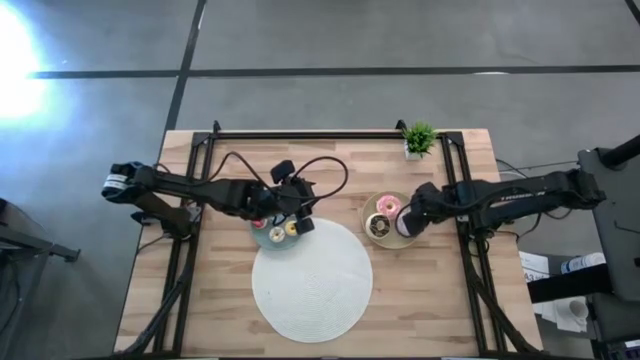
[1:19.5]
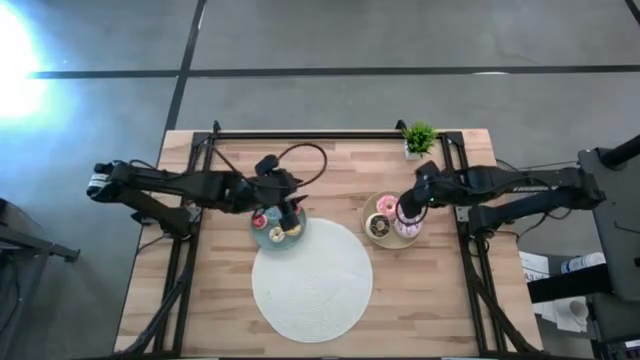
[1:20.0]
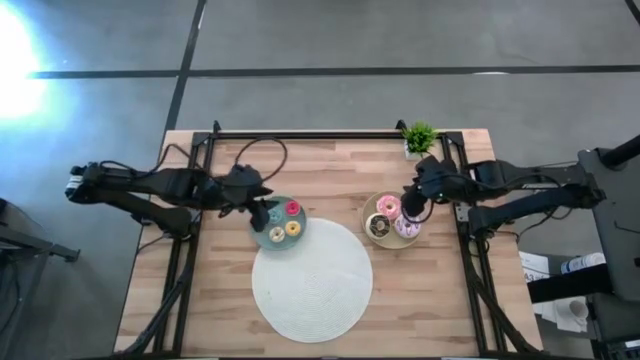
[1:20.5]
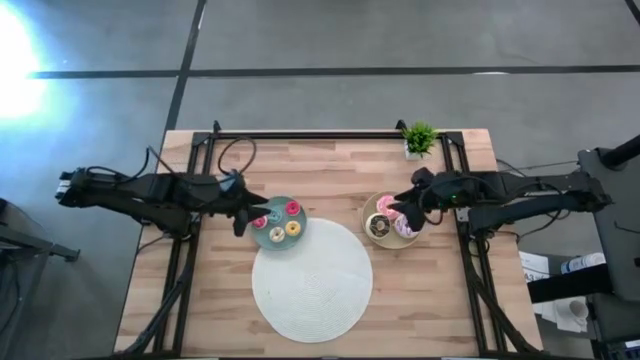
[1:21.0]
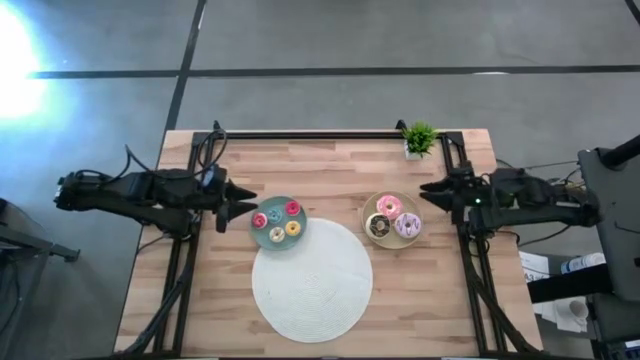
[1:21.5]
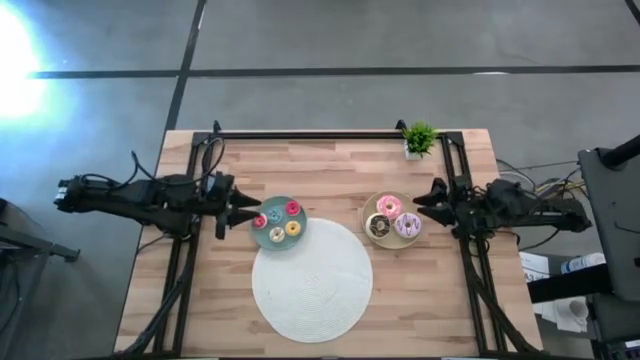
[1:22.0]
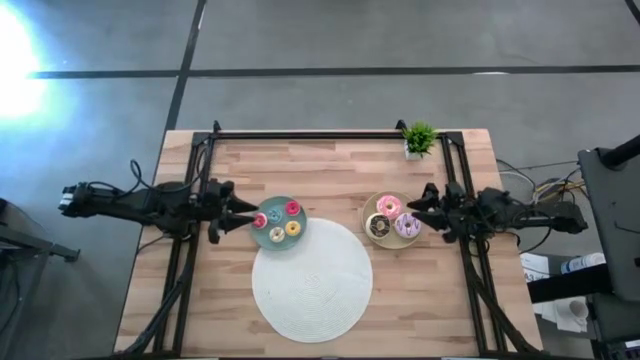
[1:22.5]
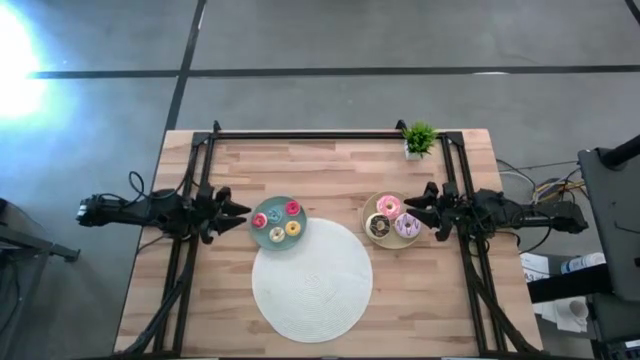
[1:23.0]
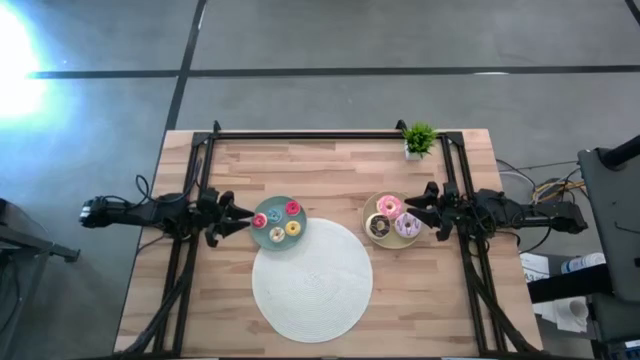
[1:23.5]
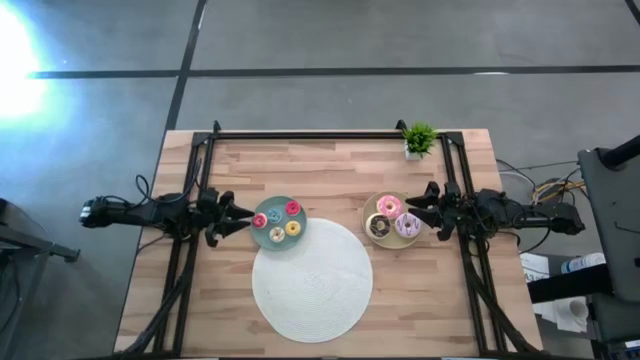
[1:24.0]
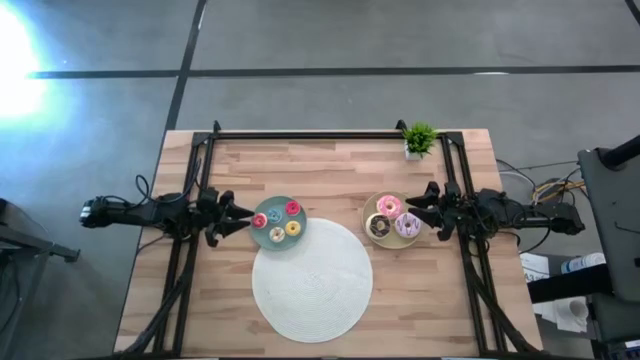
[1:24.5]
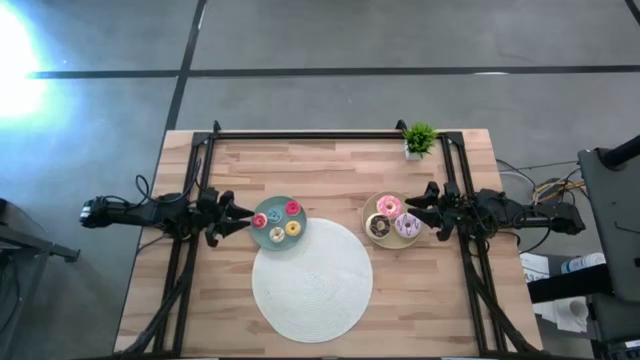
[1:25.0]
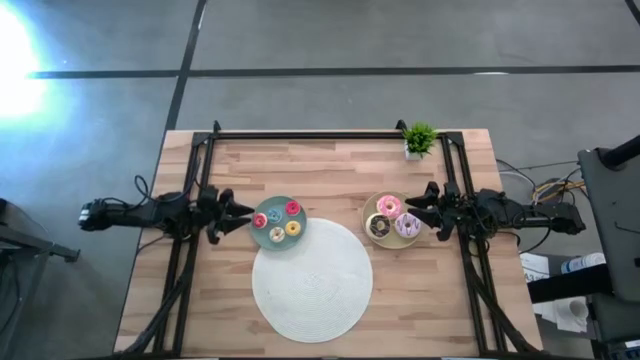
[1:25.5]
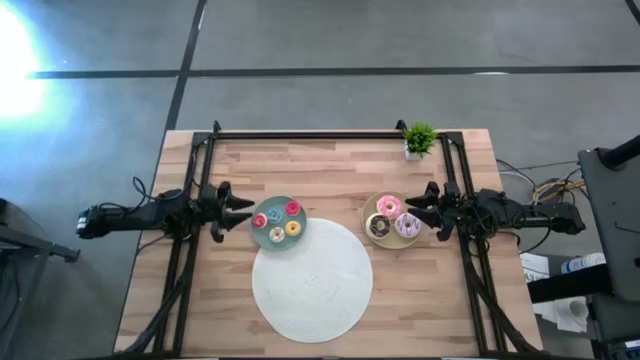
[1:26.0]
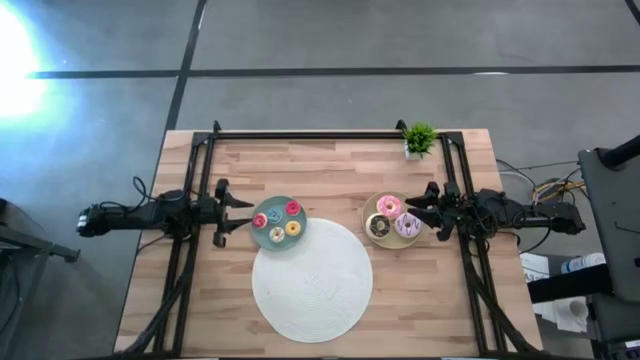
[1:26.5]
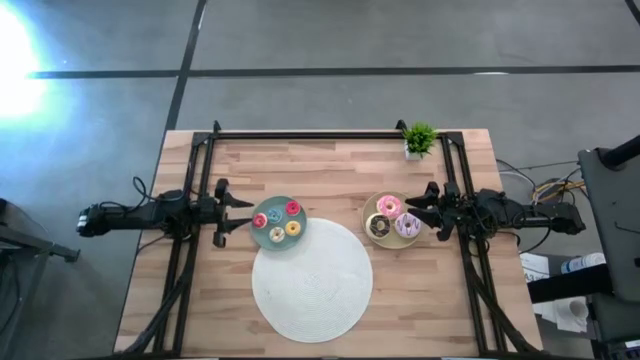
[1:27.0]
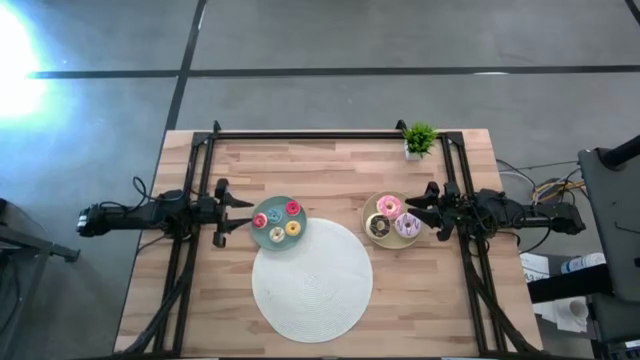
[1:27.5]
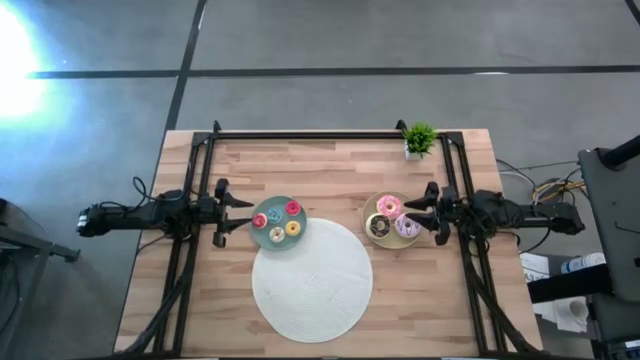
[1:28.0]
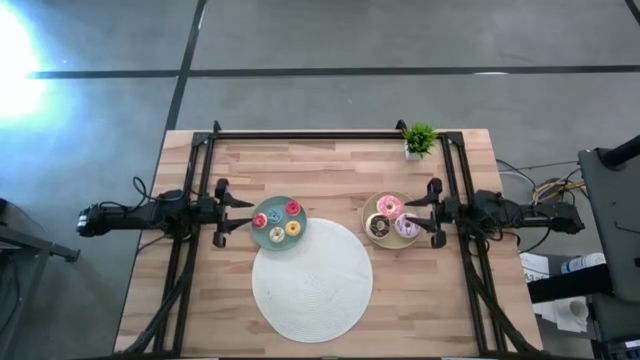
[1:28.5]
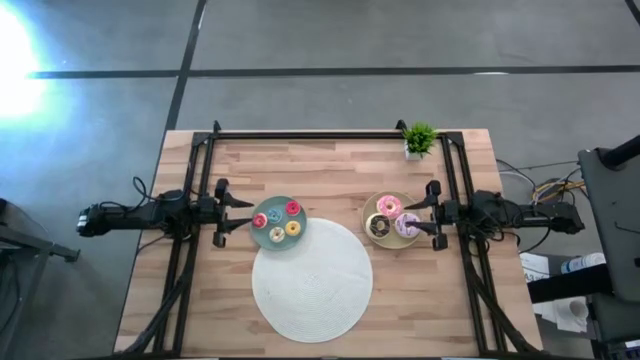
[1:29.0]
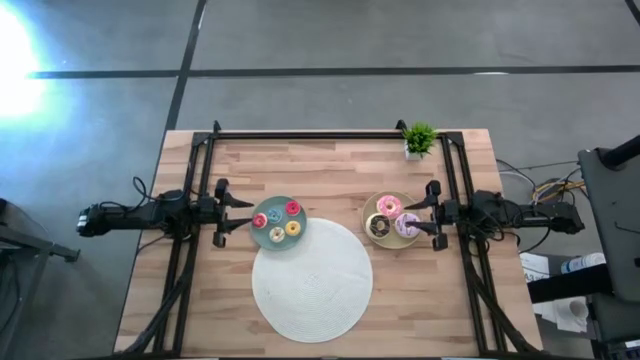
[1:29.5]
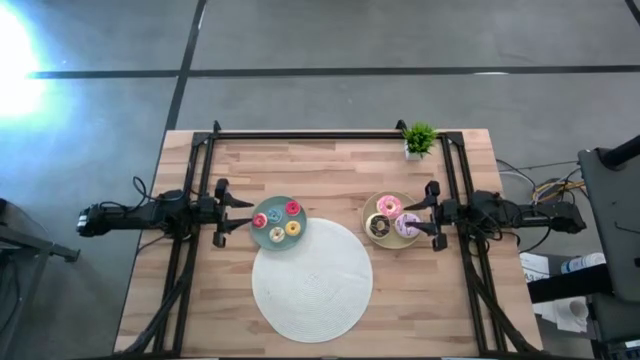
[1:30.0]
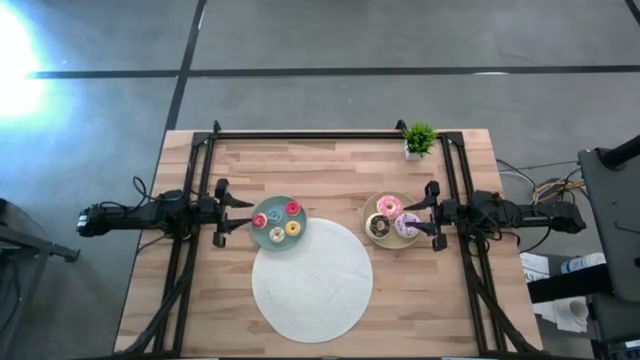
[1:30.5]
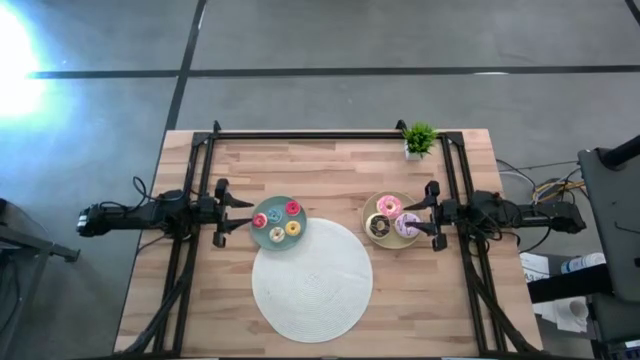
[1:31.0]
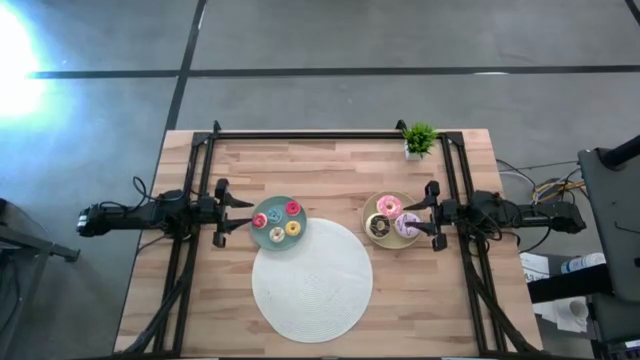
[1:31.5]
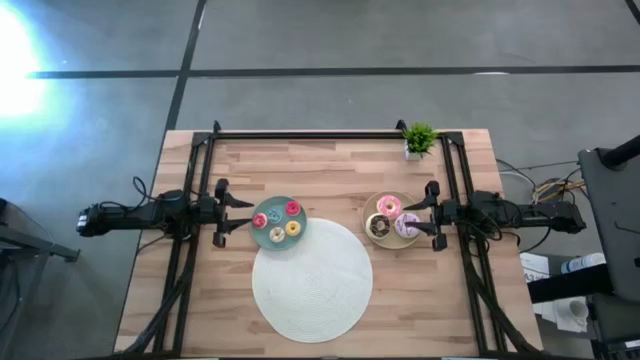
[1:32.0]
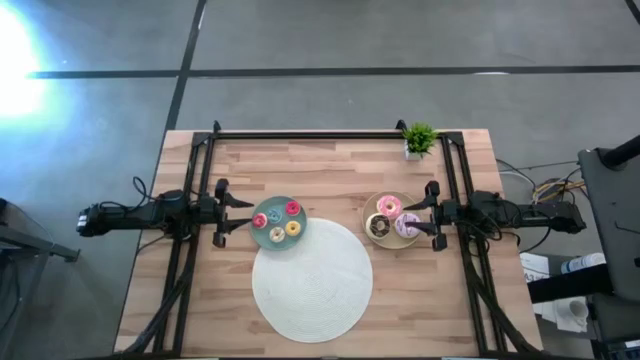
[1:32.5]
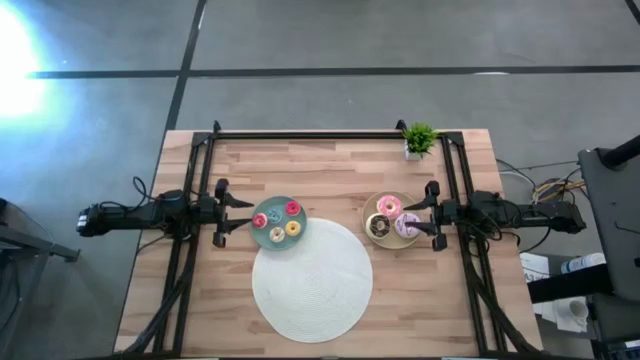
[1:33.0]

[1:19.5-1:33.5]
Task: Pick & Place donuts
Return to Home Position

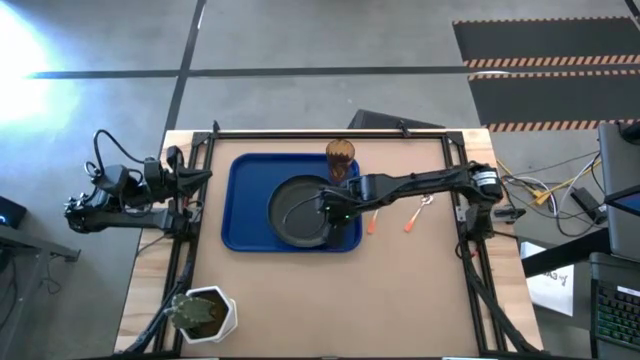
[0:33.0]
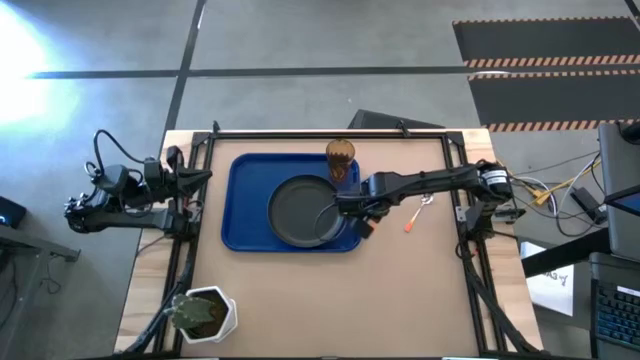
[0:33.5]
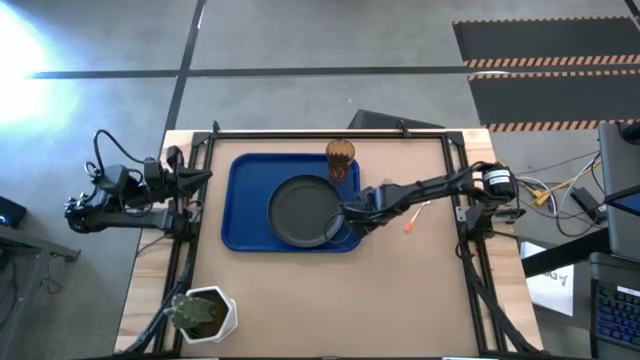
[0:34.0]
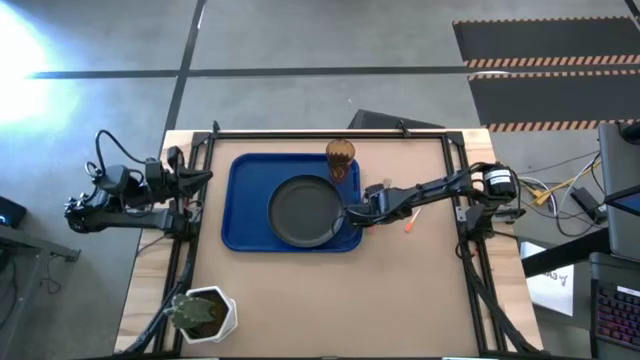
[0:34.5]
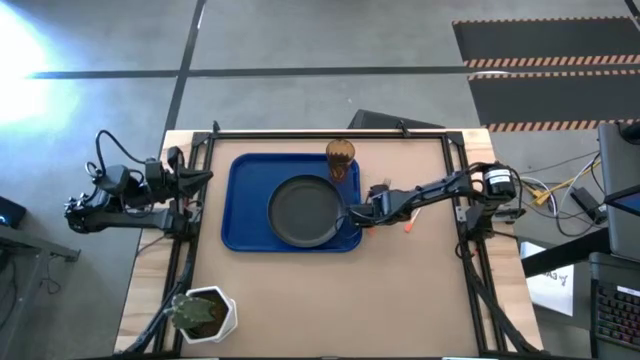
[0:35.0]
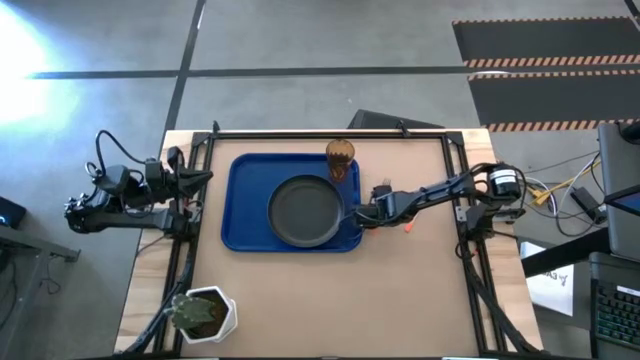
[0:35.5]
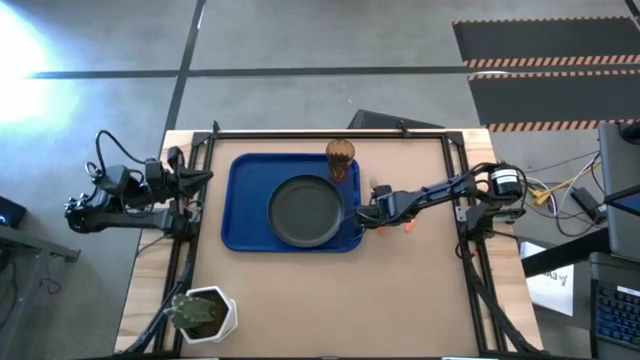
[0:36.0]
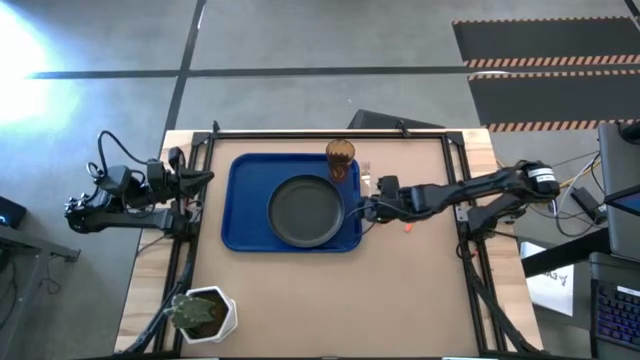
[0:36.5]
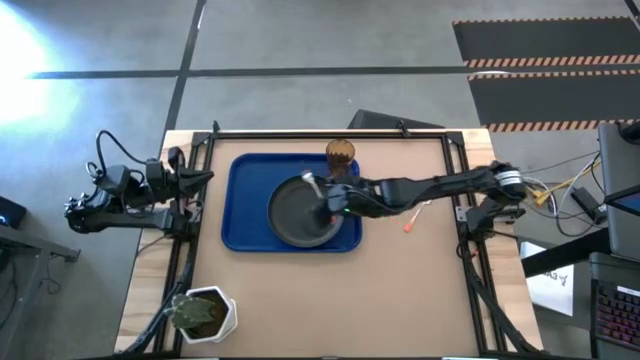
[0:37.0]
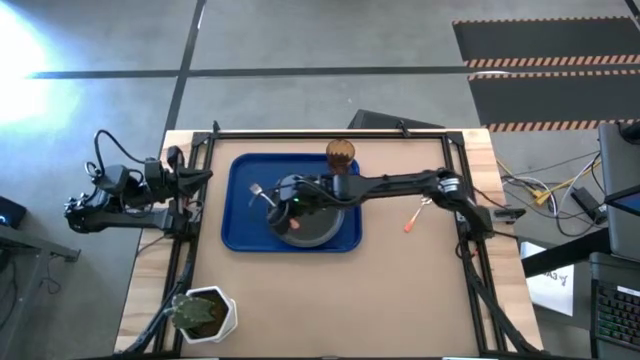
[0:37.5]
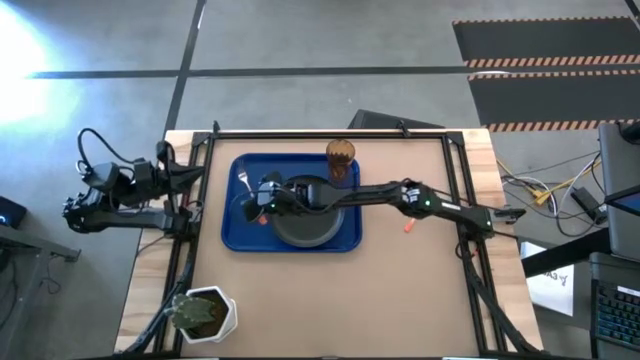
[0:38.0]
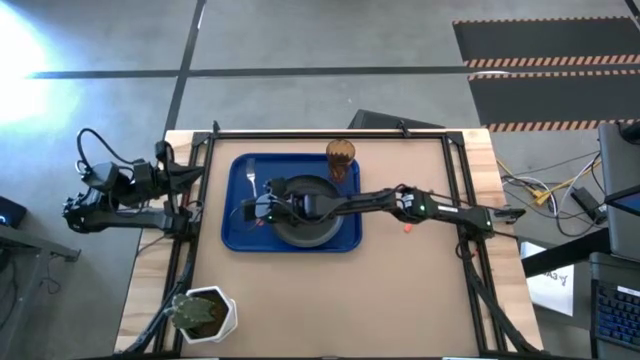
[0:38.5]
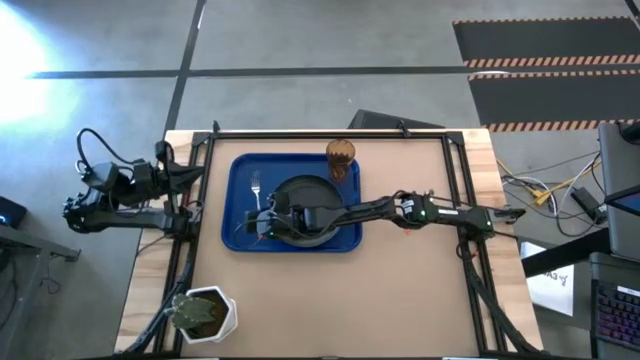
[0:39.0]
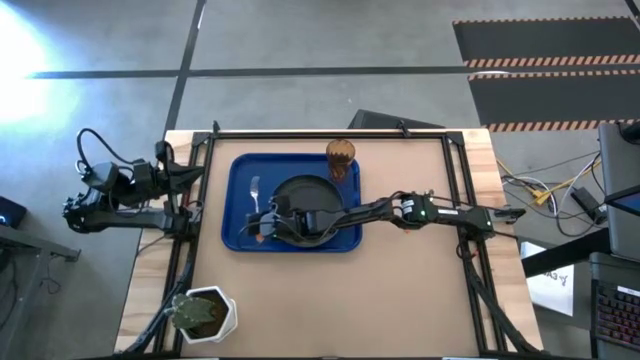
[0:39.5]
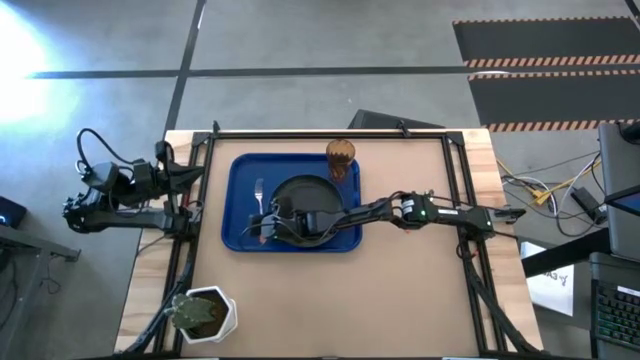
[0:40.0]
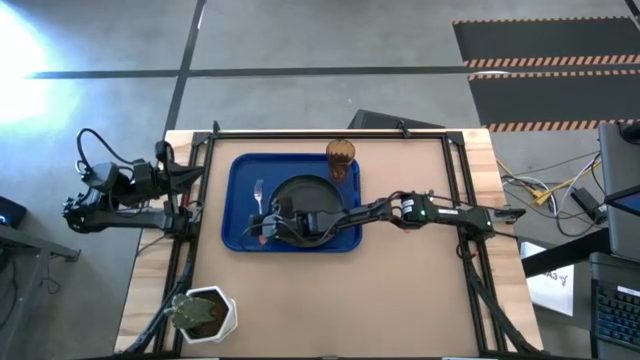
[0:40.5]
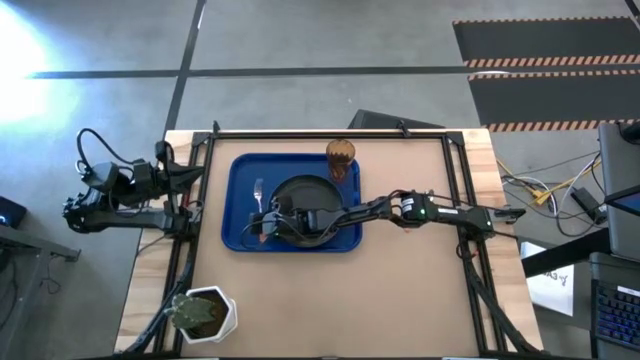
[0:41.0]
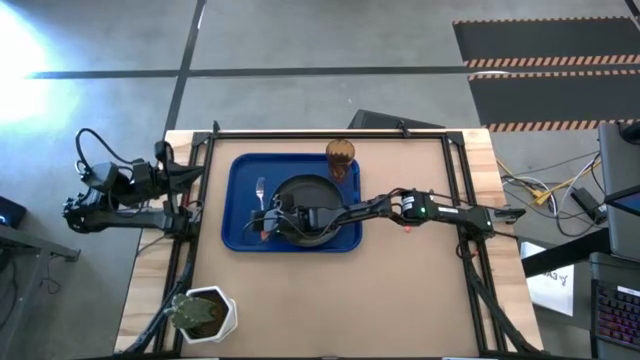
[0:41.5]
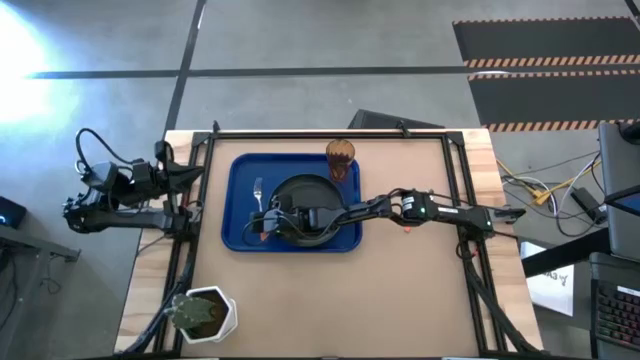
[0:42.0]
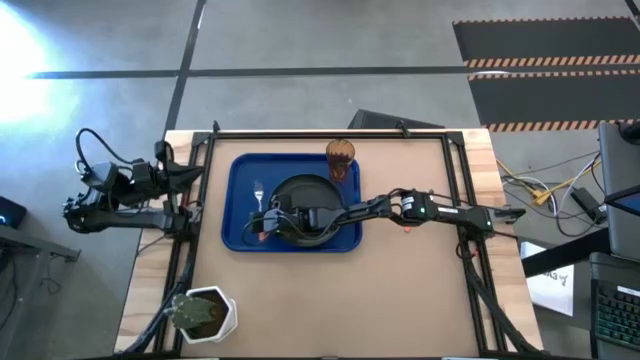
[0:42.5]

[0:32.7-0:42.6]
Task: Pick and place plate/cup/fork/spoon on tray
Put the orange fork on the left of the black plate on the blue tray
